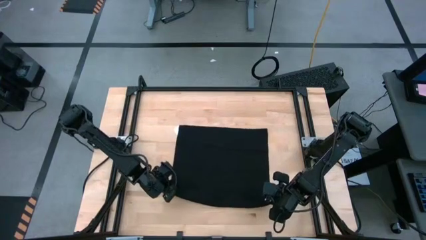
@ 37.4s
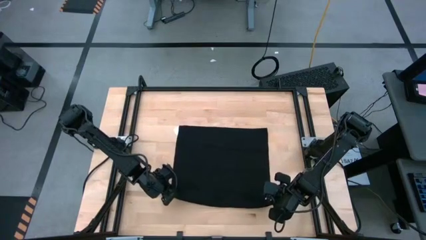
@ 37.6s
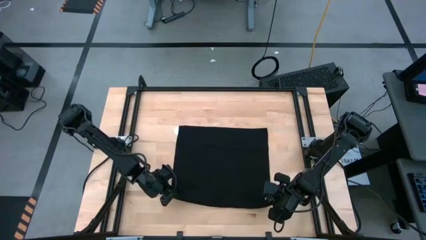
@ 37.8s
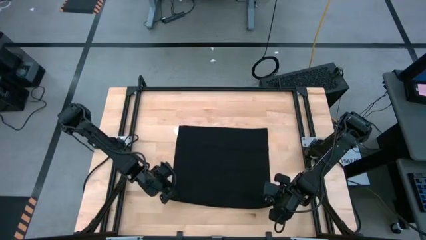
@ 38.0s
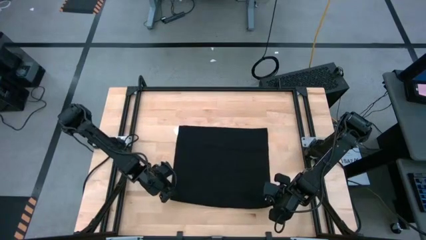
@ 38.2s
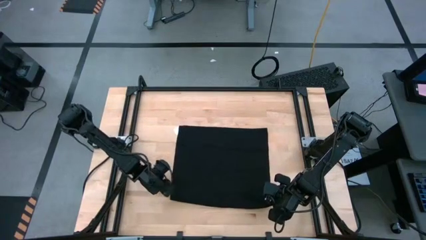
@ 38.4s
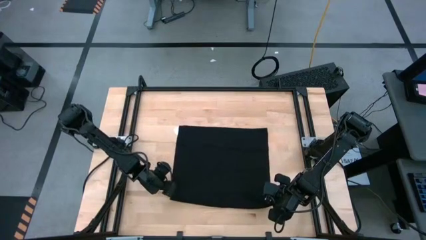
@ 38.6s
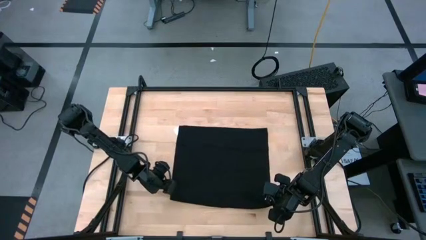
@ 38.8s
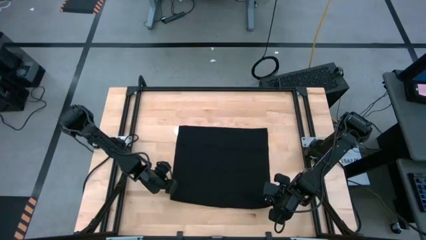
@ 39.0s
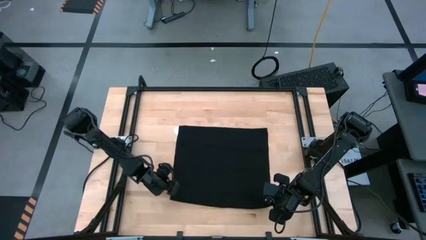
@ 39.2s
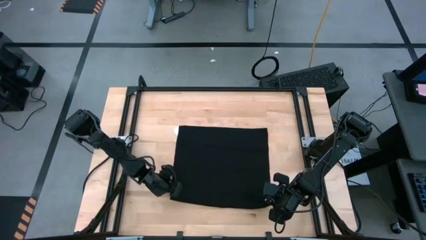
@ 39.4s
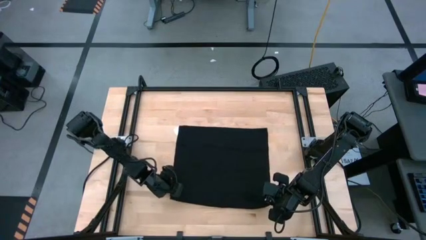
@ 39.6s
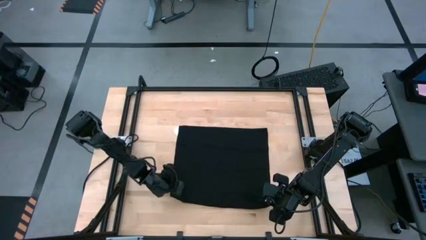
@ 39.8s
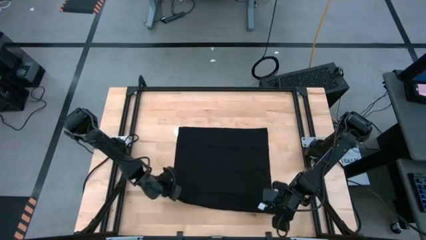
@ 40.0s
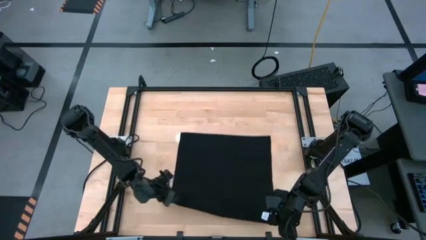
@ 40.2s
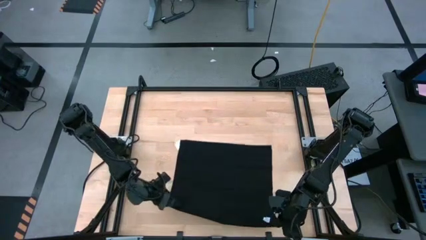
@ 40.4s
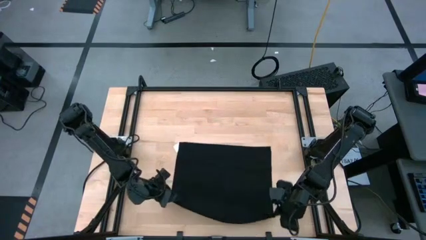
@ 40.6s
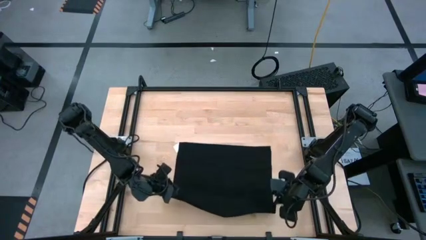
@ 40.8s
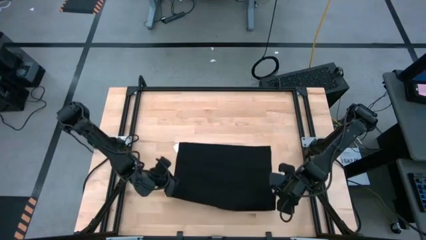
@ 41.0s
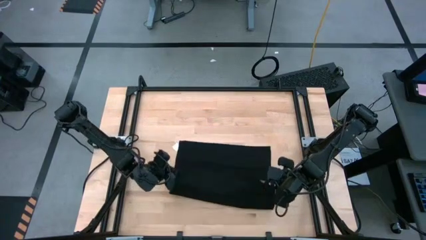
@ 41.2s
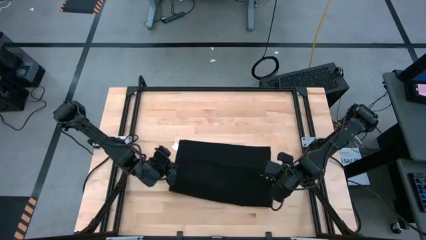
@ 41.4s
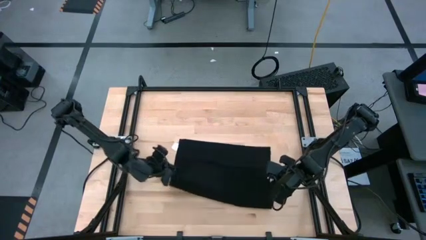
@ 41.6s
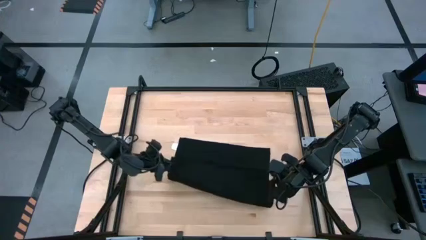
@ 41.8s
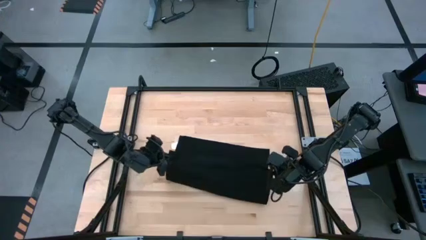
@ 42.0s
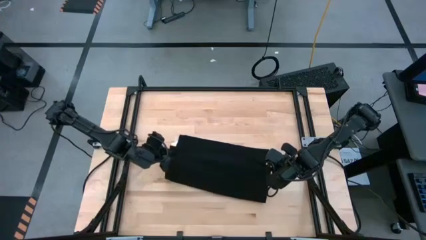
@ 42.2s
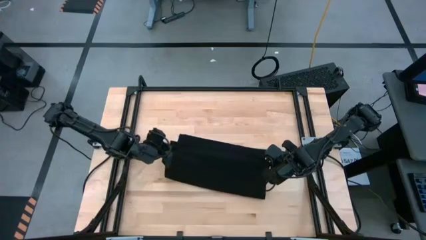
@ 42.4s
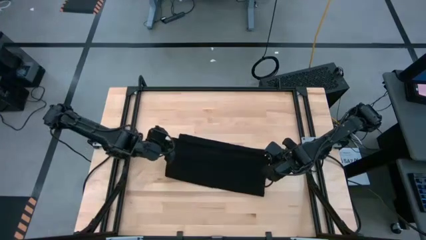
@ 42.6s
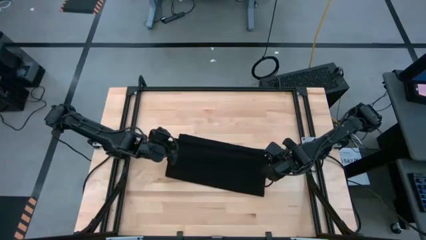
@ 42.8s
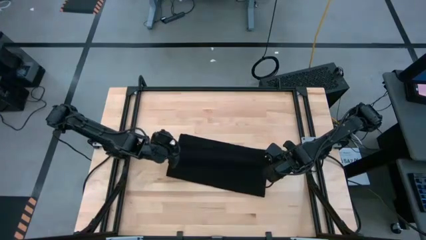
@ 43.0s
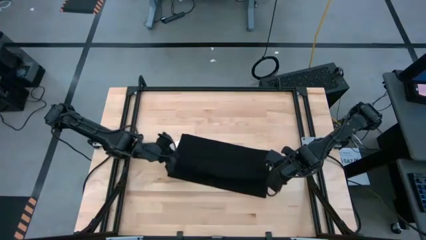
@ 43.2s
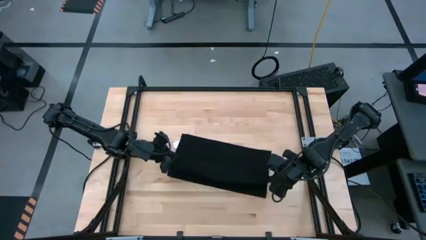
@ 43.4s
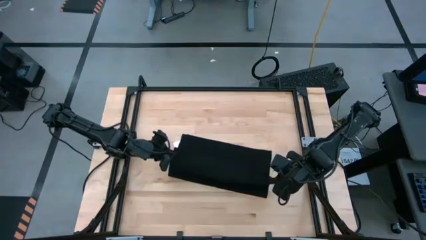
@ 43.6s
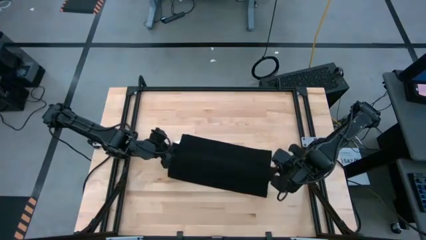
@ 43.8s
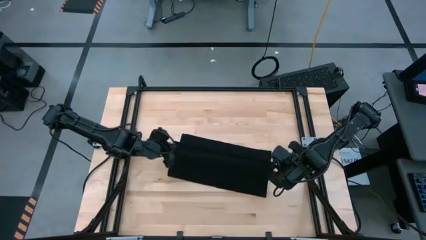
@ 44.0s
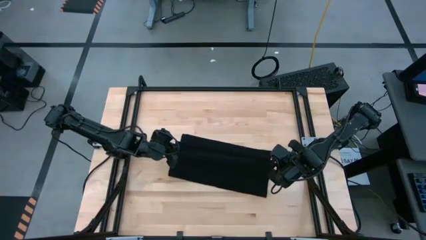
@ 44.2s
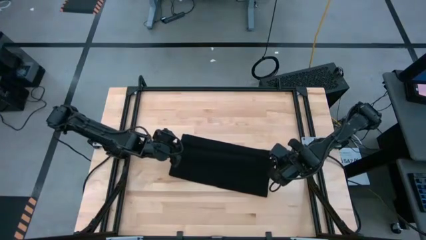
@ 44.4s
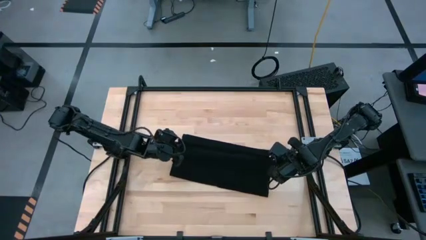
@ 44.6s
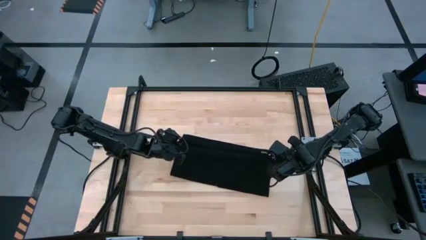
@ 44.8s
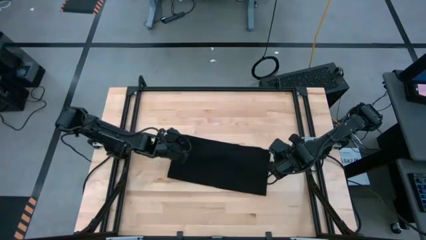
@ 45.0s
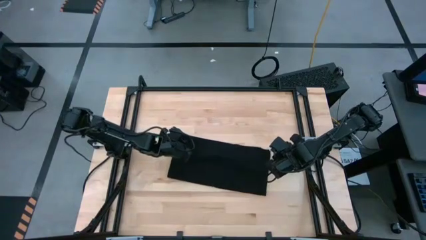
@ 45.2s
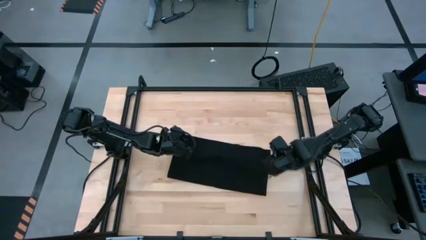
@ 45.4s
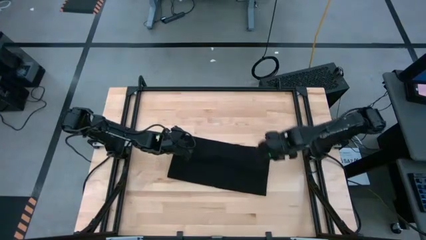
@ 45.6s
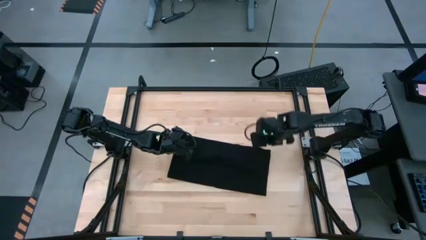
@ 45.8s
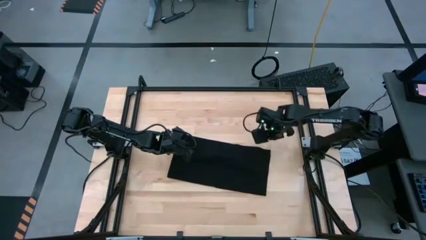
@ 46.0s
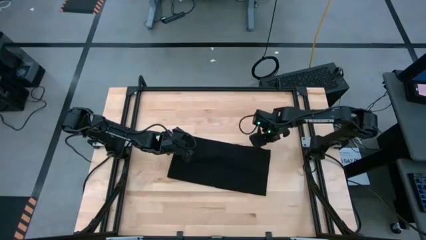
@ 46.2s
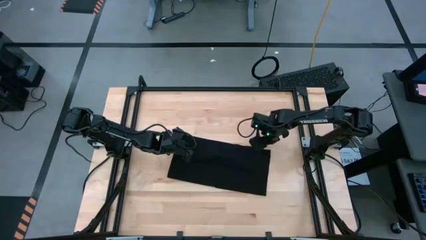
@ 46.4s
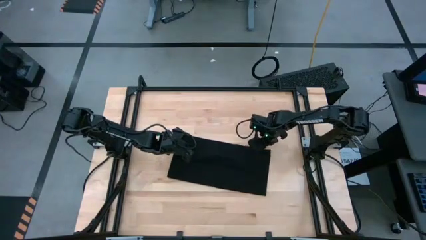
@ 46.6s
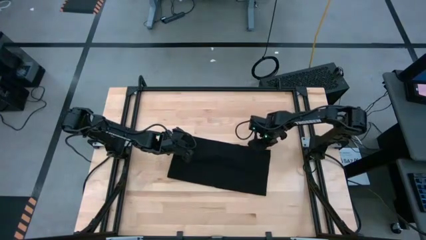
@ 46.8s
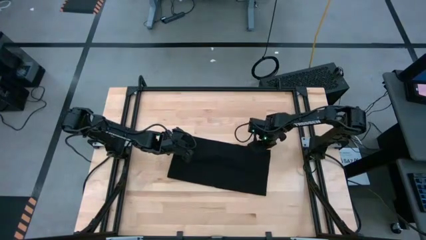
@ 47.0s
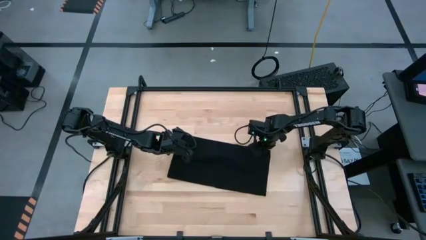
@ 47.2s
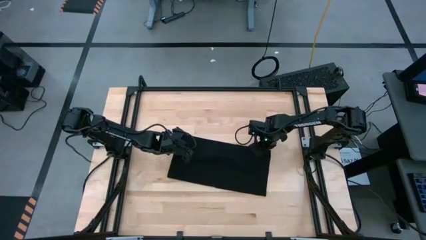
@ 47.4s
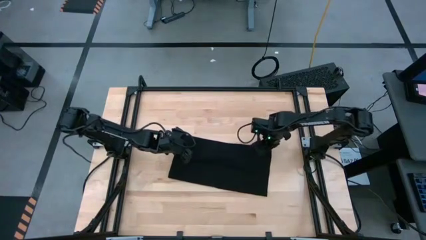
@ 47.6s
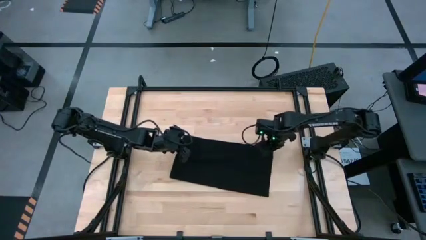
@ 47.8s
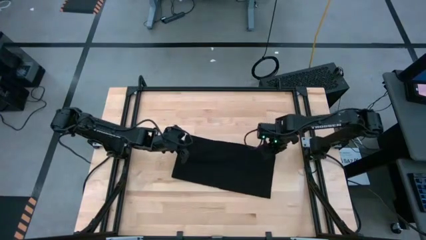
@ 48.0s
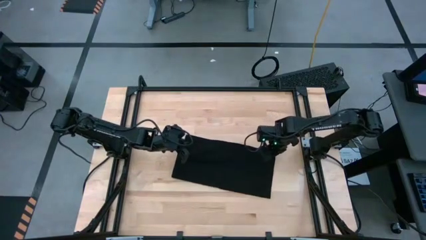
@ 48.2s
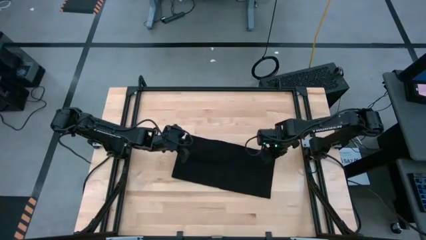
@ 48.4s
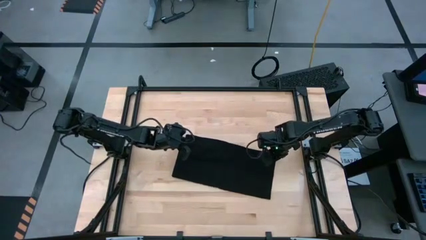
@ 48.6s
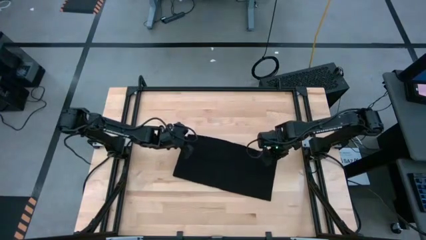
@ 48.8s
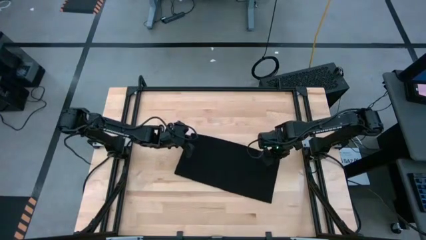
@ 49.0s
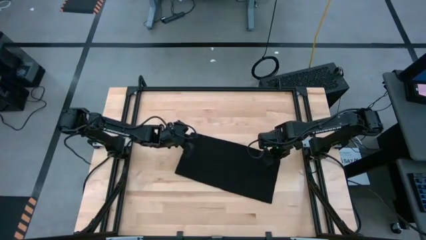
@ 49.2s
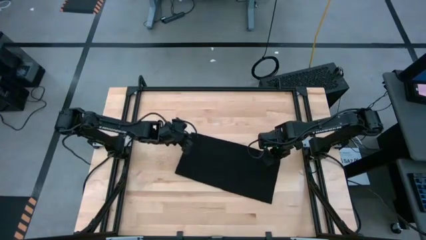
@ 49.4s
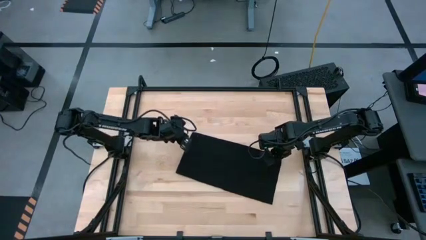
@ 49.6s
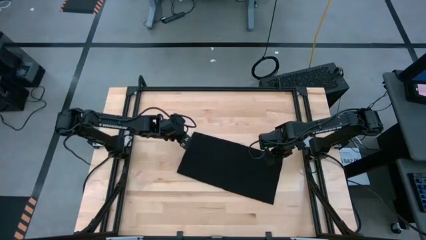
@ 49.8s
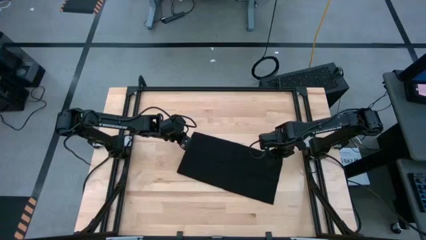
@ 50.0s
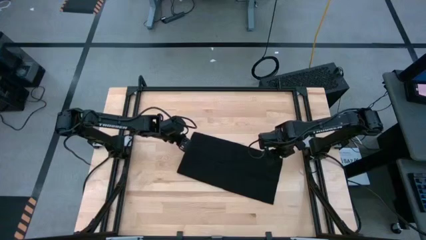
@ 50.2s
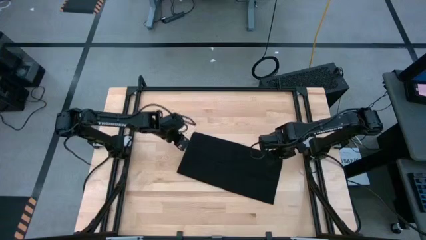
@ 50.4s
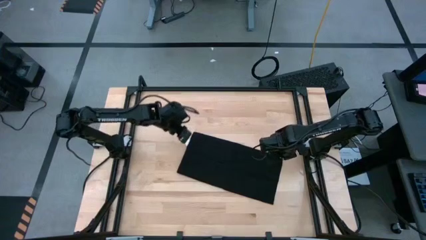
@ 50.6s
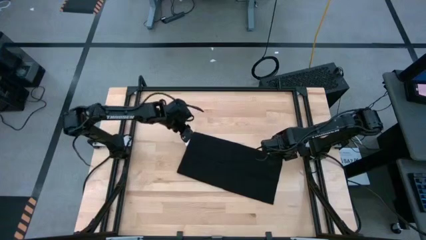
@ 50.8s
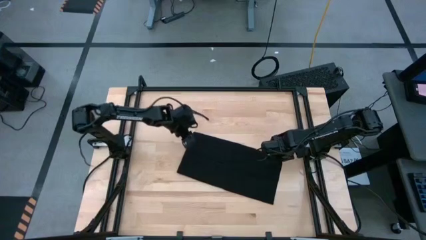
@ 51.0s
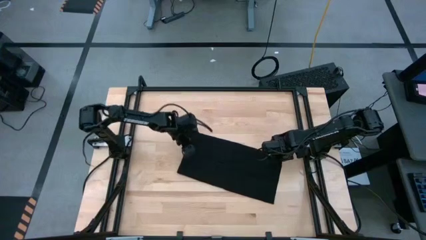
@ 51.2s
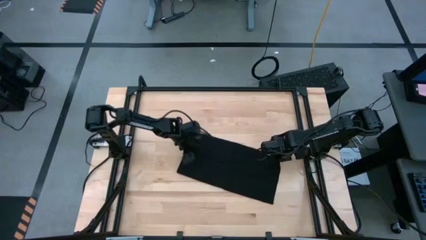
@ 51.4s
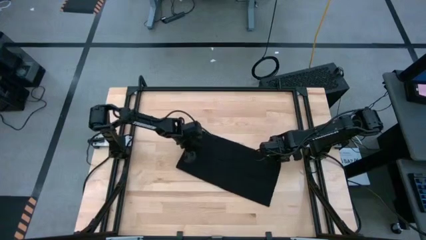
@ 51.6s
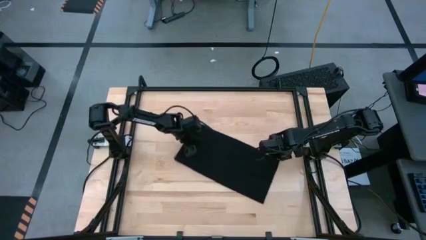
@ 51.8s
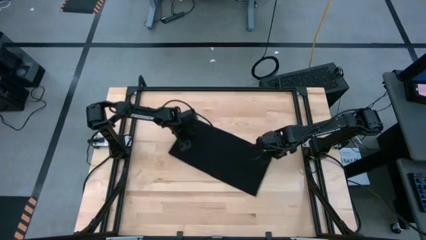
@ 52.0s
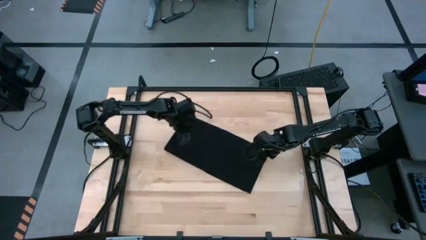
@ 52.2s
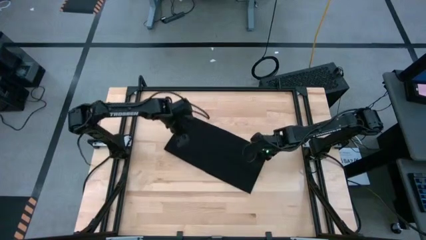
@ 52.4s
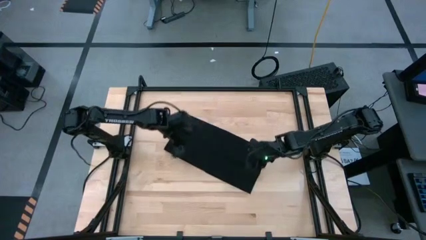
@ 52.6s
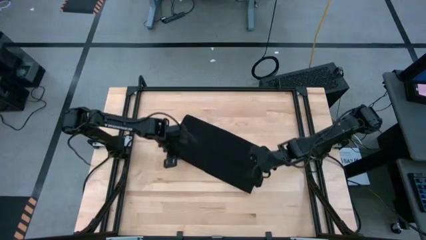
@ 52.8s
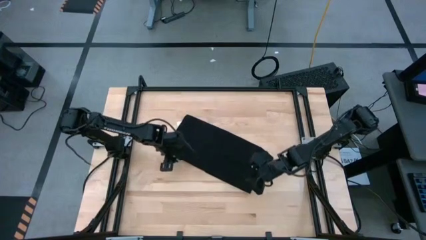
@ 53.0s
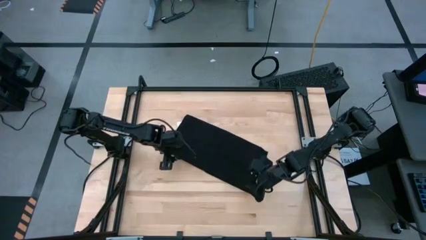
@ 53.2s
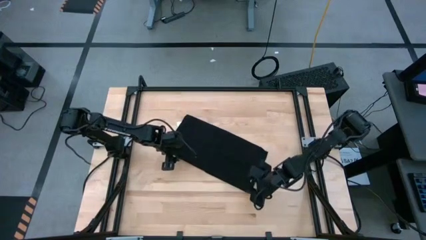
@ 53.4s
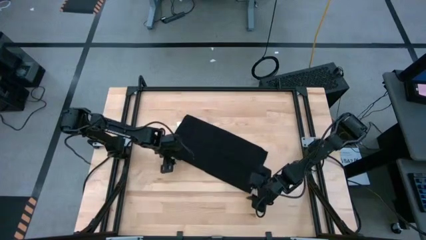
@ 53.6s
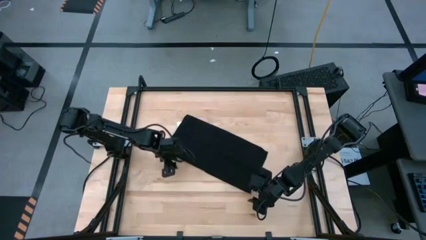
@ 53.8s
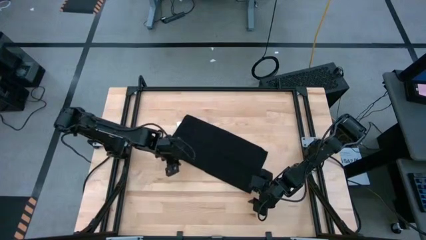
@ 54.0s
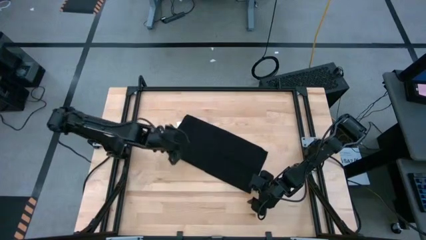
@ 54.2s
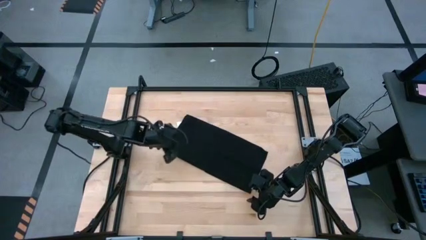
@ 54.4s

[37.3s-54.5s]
Task: Roll napkin
Fold the black napkin
